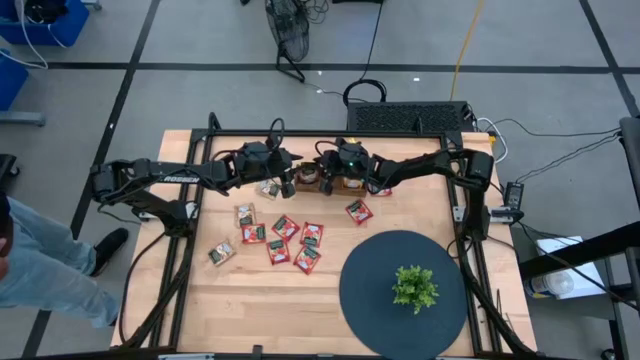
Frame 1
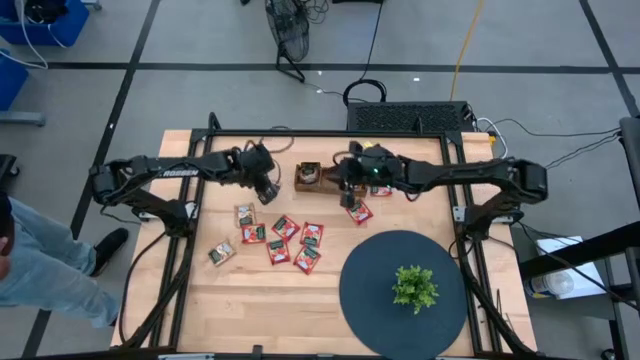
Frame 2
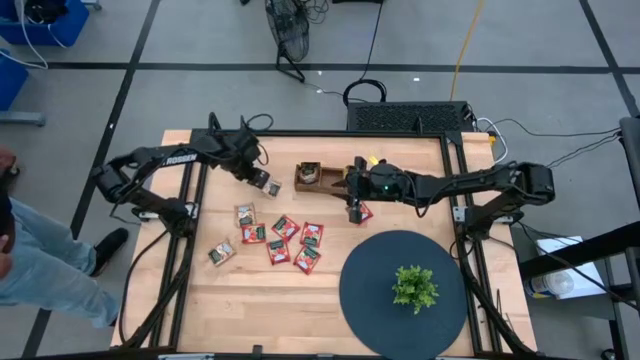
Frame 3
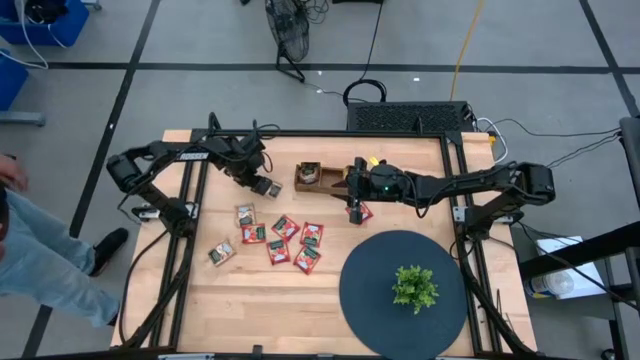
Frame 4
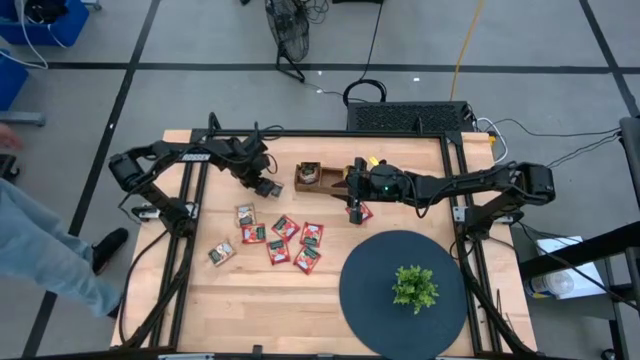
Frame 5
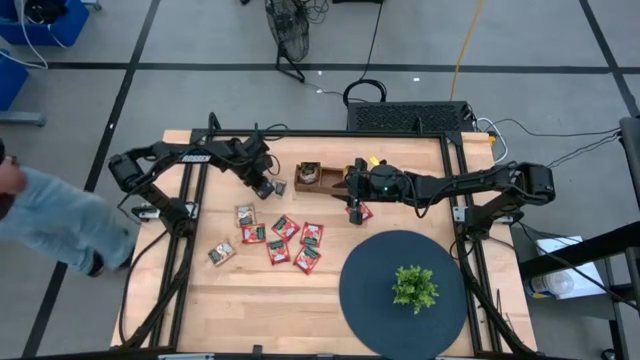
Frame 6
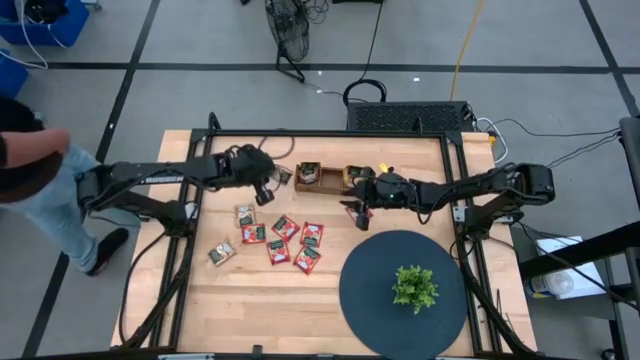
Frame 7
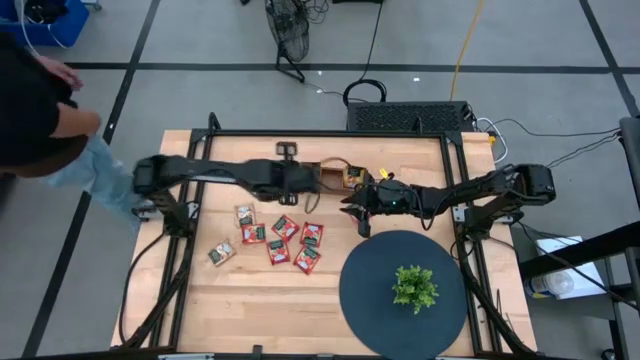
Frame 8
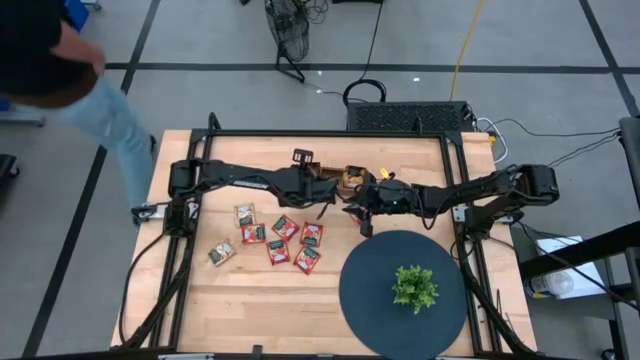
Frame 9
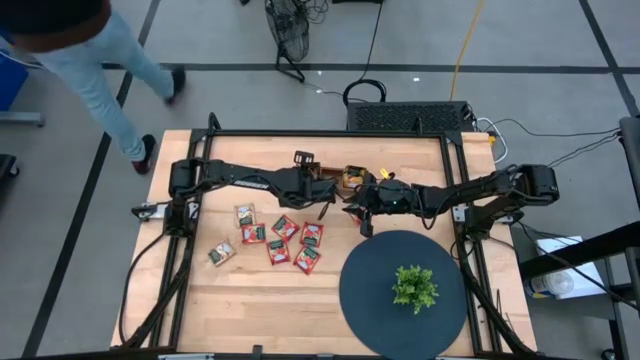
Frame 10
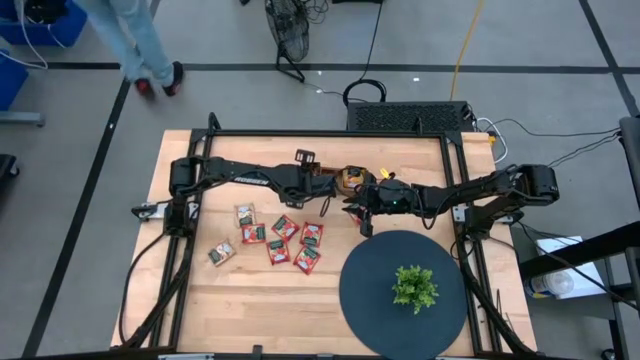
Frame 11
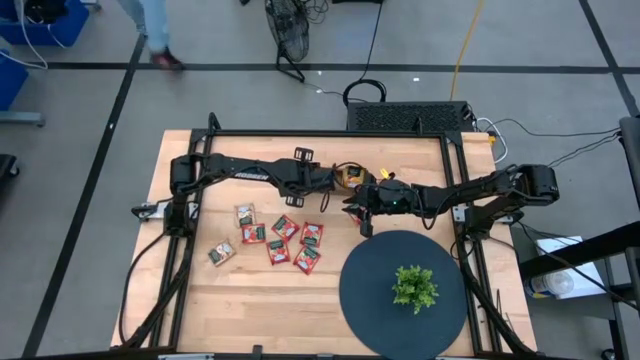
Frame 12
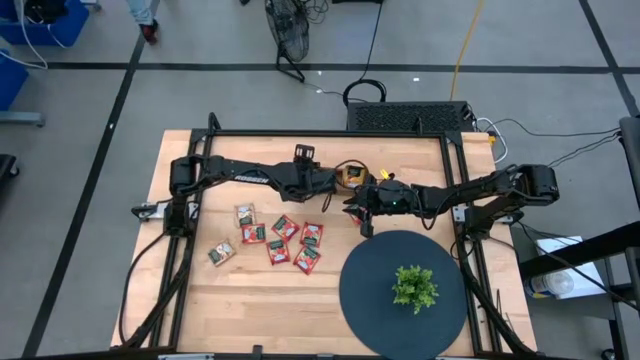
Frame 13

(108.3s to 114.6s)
Task: Pick & Place Tea
Put the brown tea bag into the left section wooden organizer

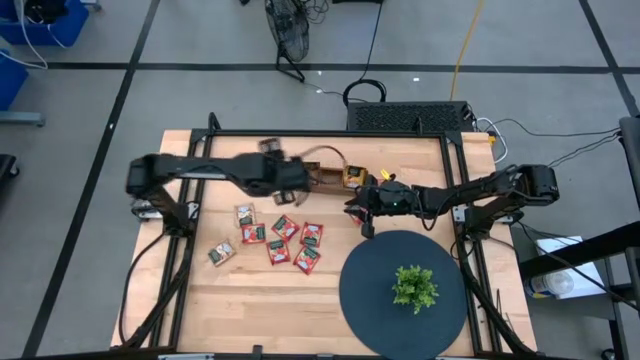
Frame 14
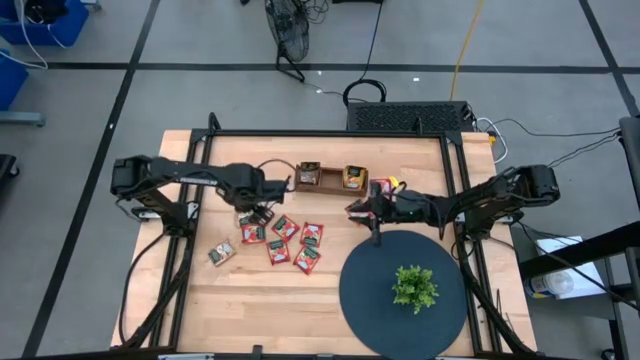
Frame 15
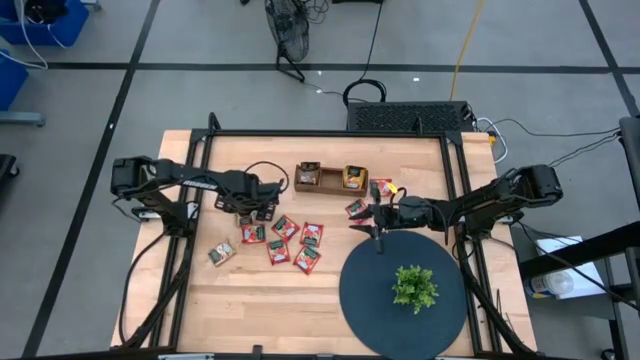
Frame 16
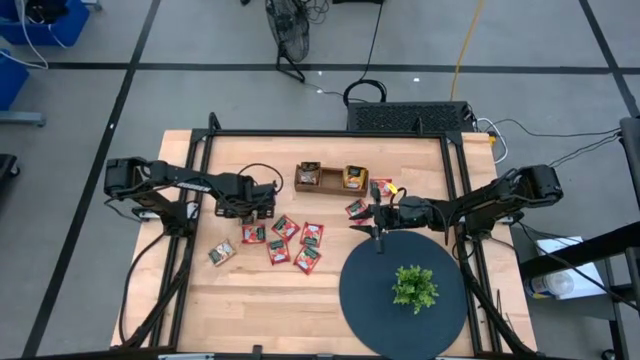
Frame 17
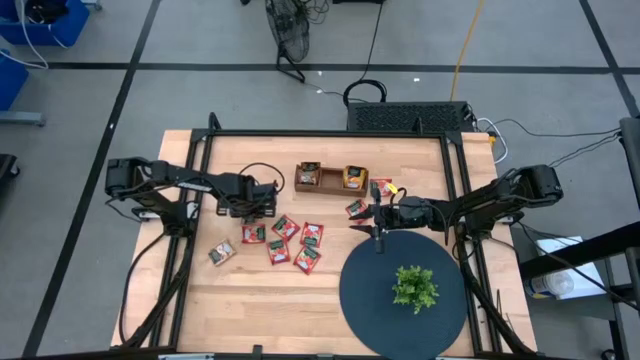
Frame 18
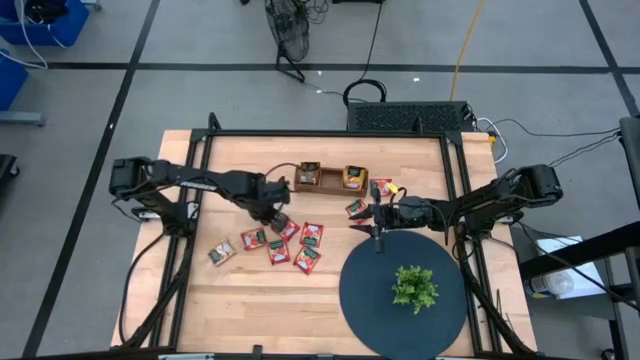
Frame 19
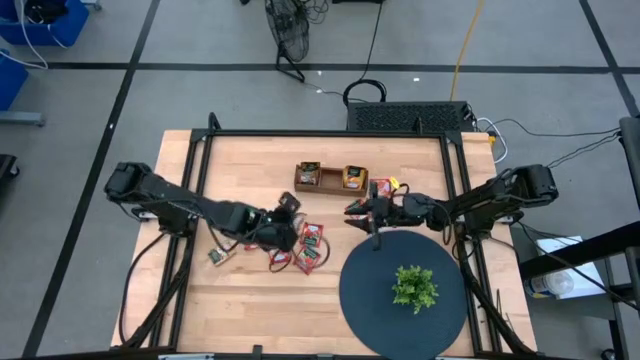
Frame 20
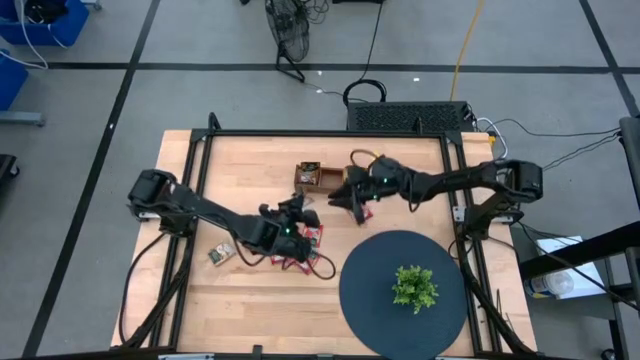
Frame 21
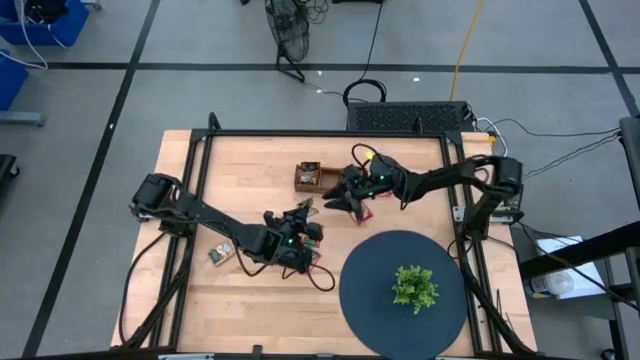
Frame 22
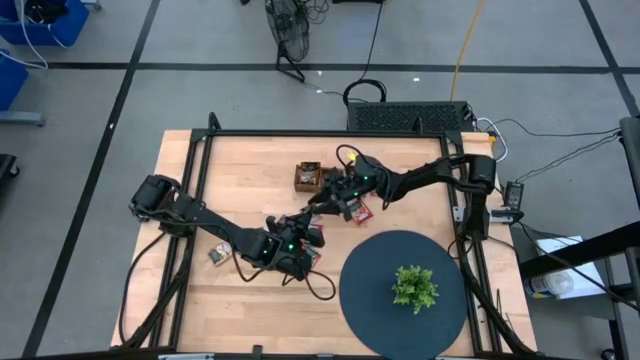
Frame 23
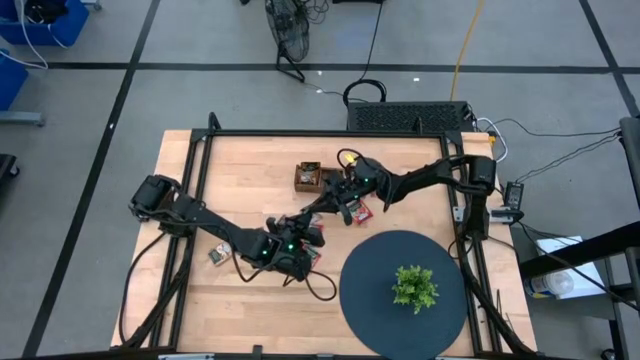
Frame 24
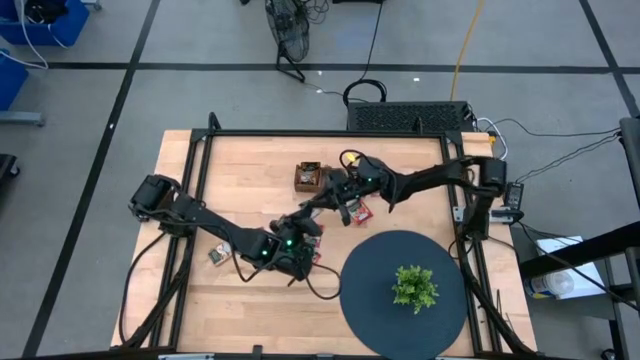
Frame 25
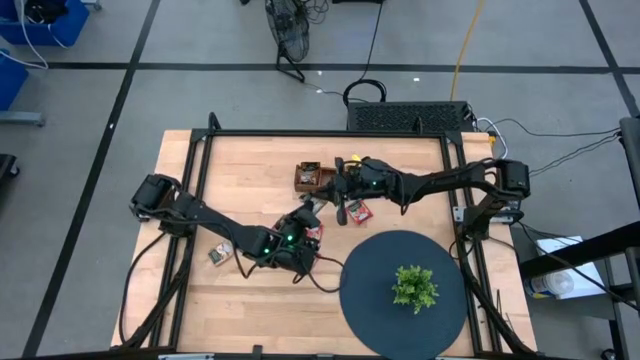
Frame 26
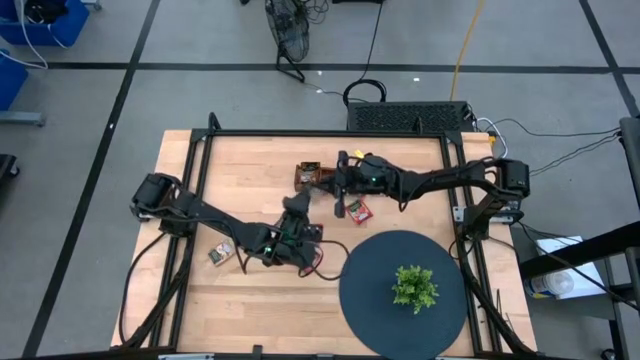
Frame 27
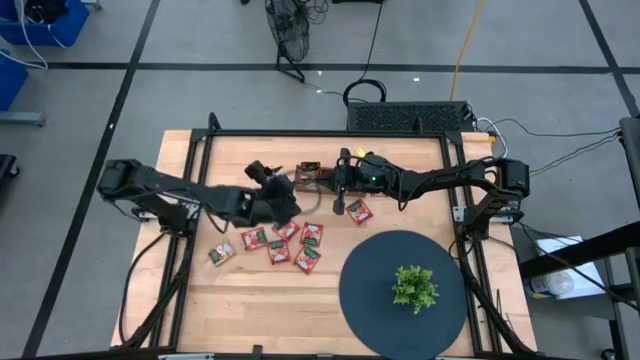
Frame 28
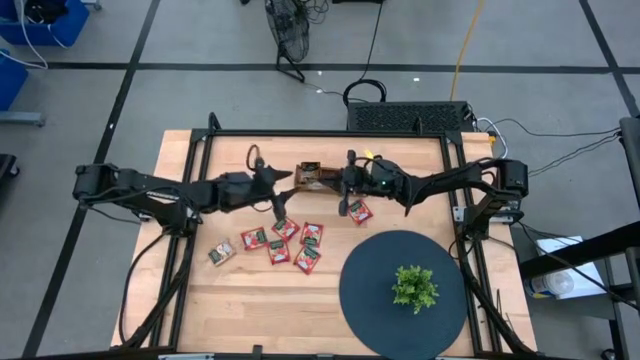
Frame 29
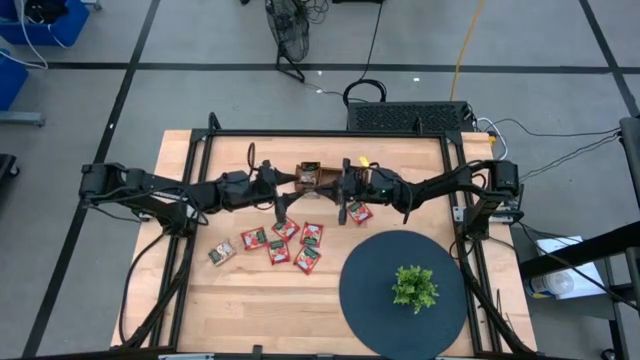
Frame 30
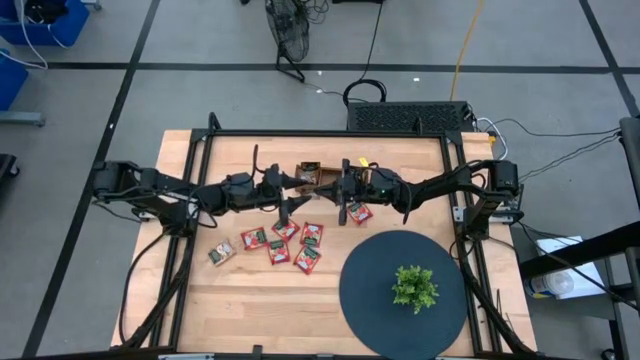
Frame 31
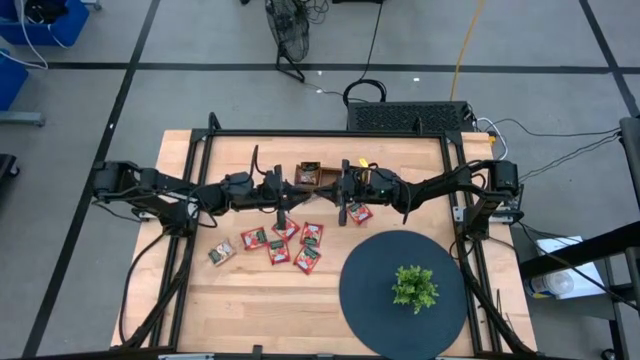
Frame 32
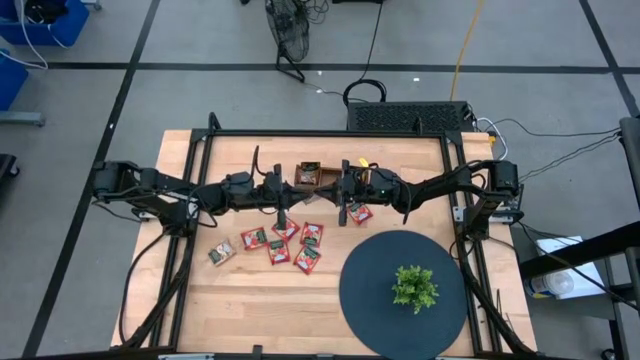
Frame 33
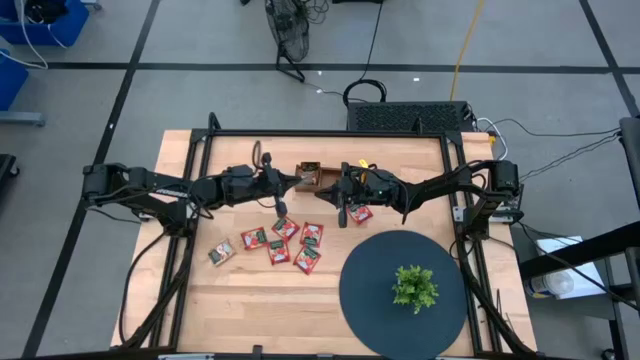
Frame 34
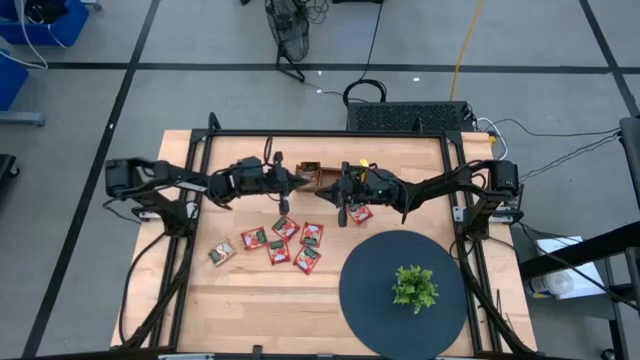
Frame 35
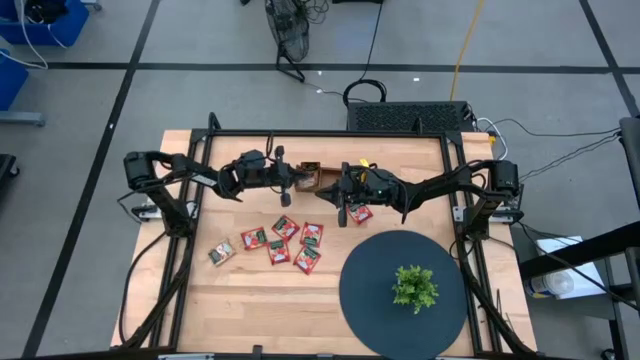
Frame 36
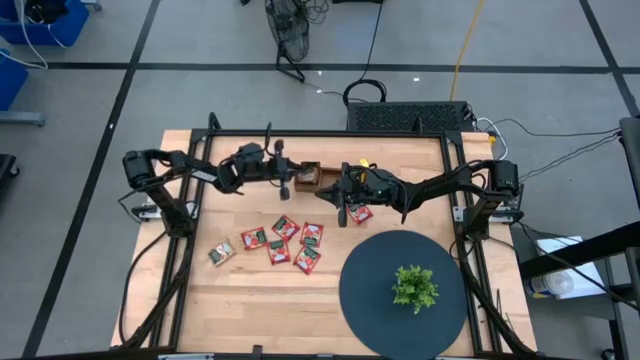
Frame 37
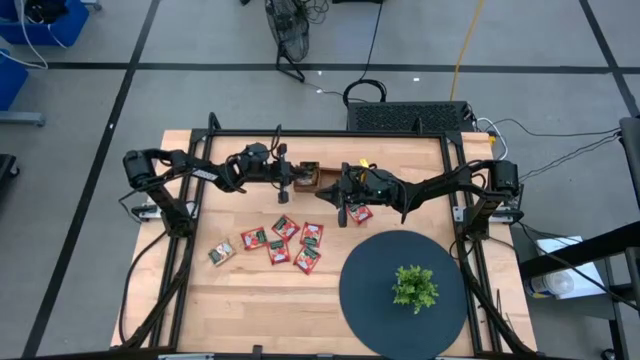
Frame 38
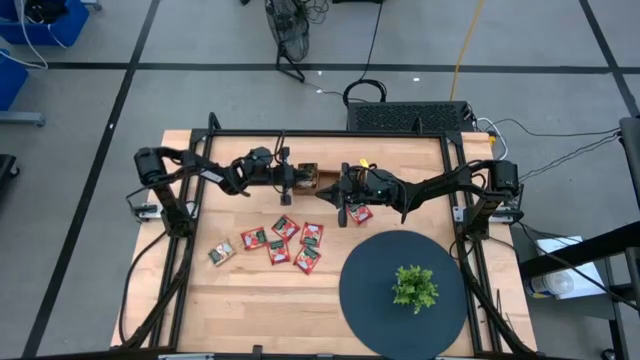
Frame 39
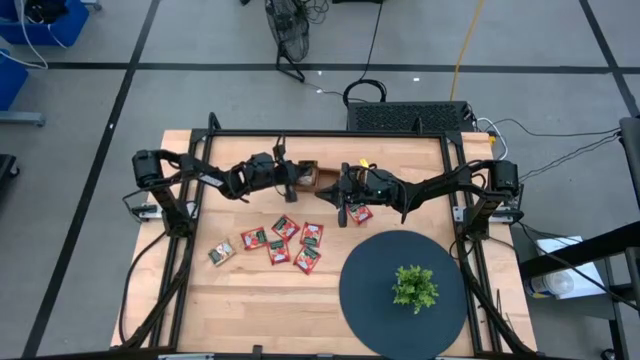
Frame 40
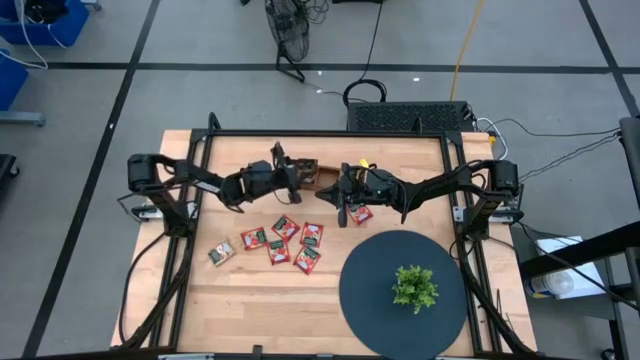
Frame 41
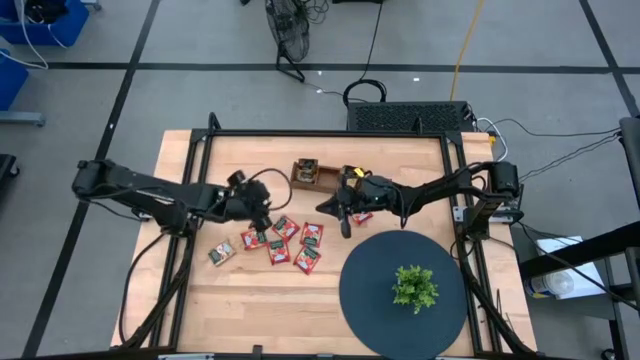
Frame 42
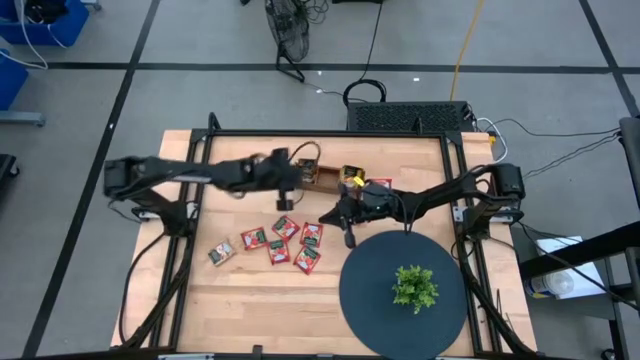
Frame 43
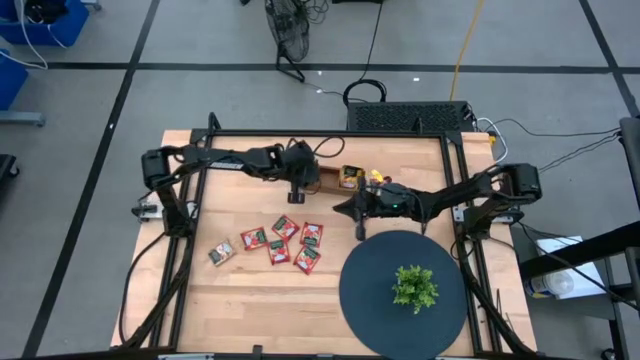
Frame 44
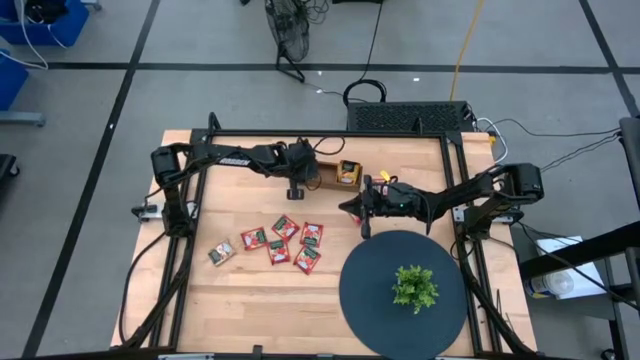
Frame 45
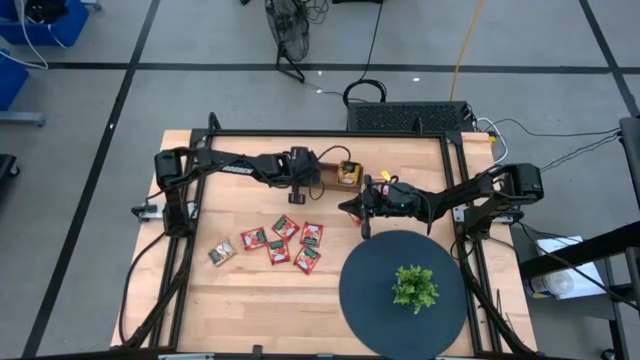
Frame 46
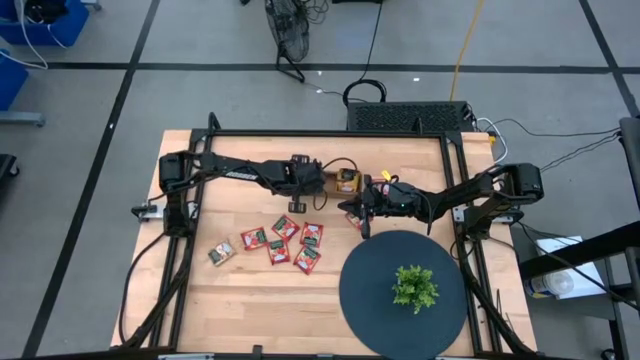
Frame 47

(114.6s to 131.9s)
Put the brown tea bag into the left section wooden organizer
